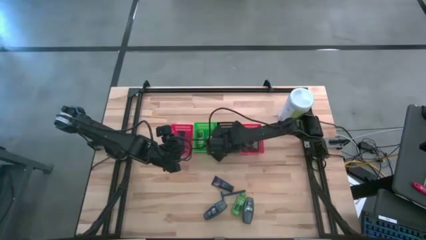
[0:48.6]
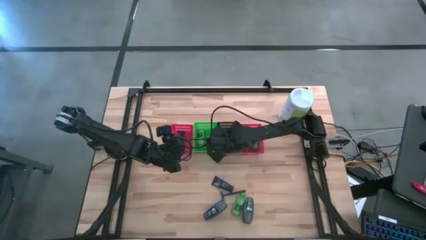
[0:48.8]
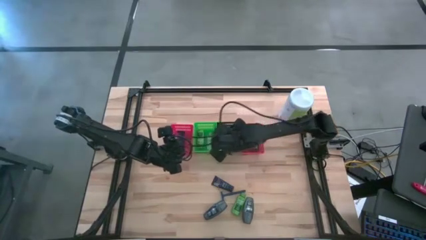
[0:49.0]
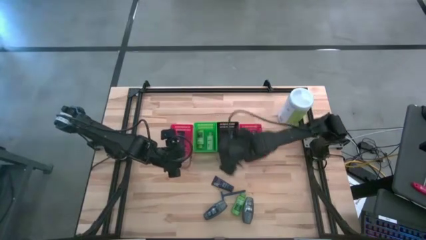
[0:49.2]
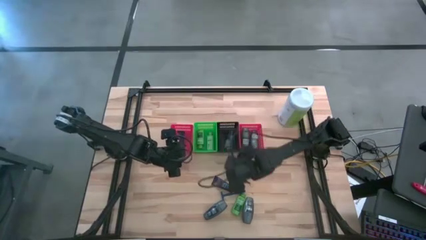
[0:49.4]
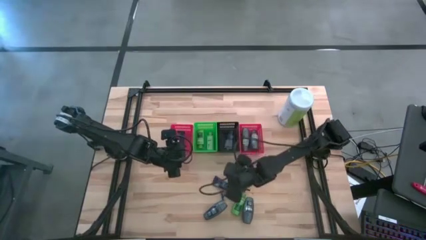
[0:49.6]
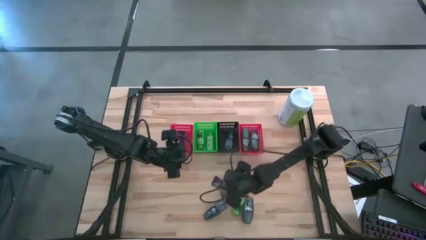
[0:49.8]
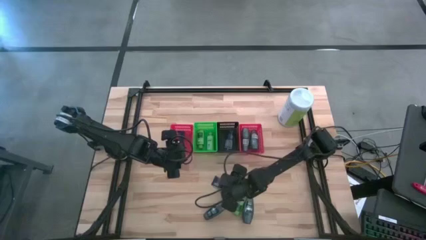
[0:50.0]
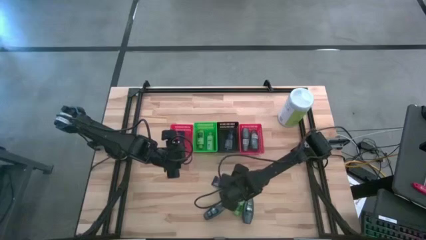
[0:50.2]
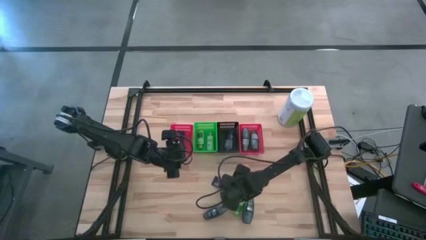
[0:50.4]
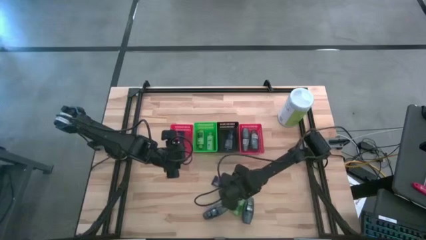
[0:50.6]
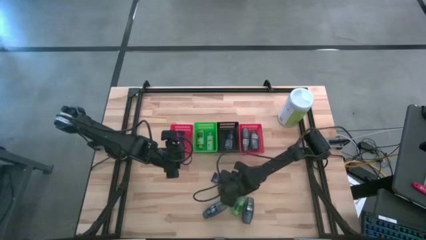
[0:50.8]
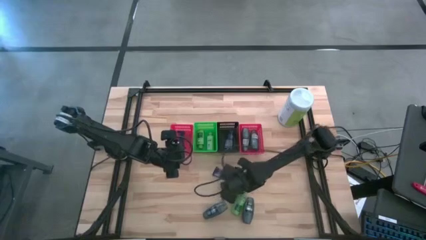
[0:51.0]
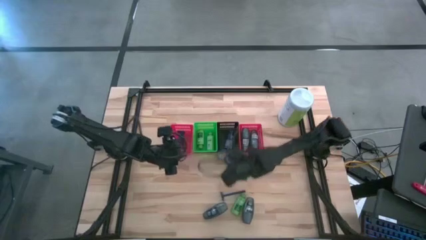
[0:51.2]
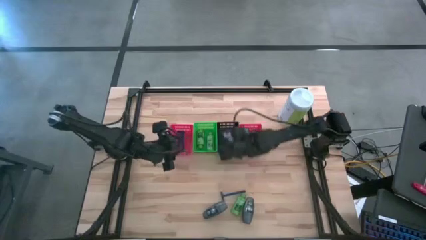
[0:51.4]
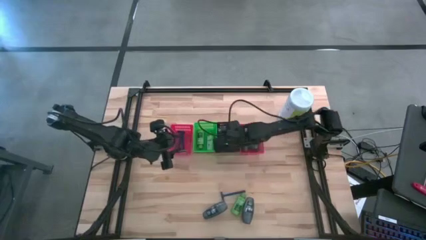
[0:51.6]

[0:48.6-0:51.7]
Task: Pick & Place Travel size toiletries
Put the blue shaving cream into the black bin

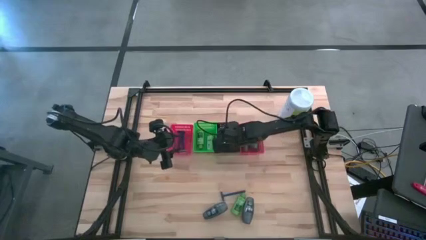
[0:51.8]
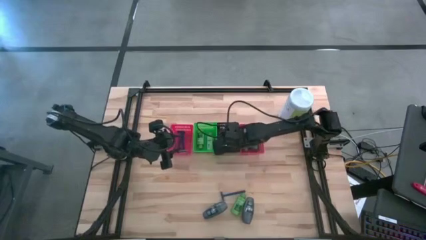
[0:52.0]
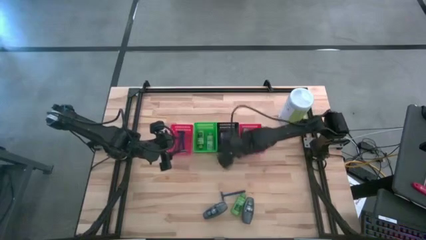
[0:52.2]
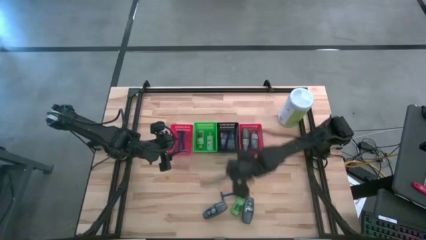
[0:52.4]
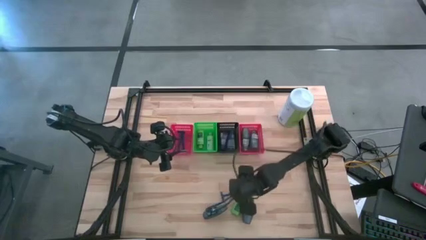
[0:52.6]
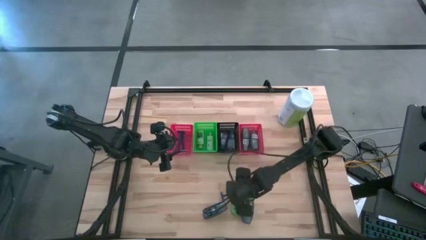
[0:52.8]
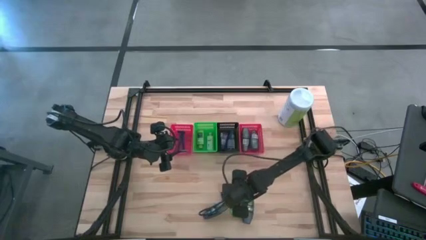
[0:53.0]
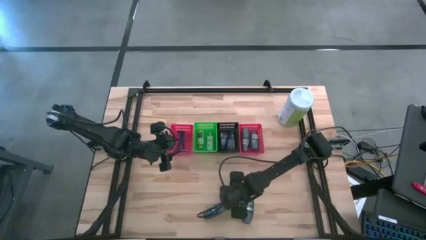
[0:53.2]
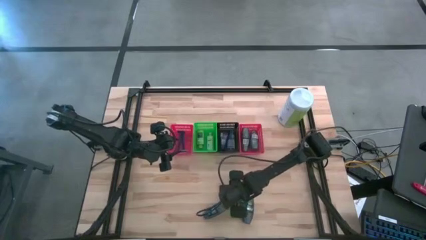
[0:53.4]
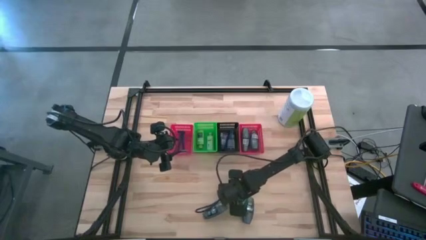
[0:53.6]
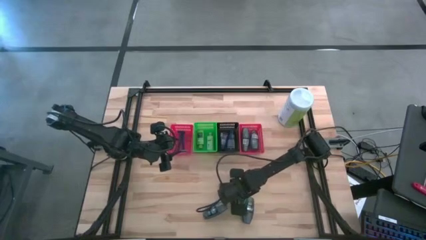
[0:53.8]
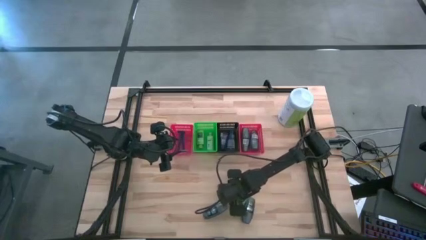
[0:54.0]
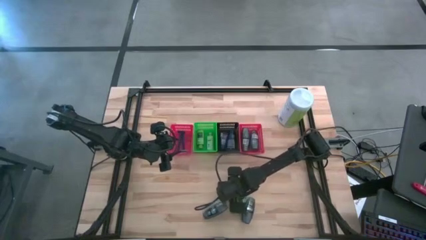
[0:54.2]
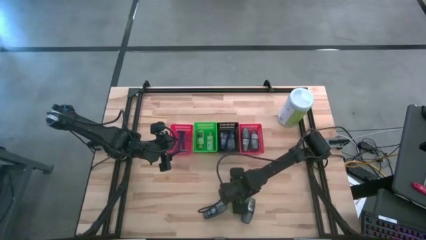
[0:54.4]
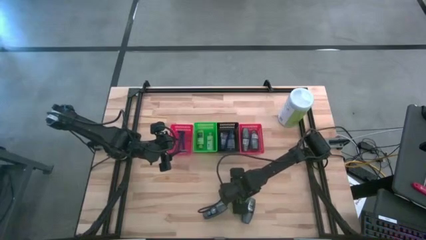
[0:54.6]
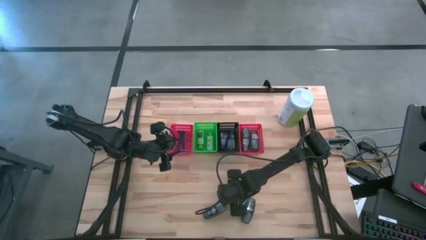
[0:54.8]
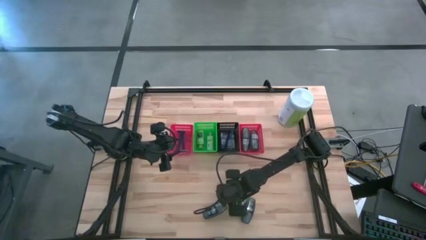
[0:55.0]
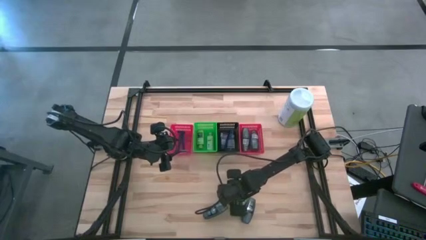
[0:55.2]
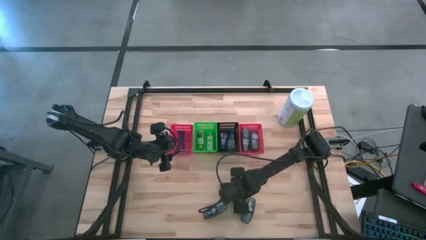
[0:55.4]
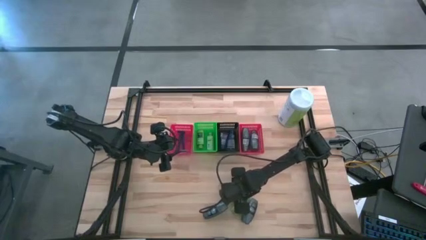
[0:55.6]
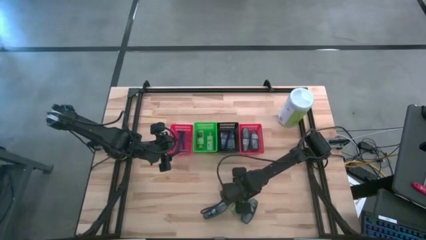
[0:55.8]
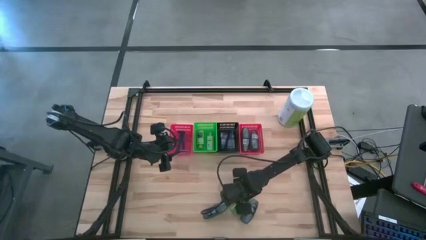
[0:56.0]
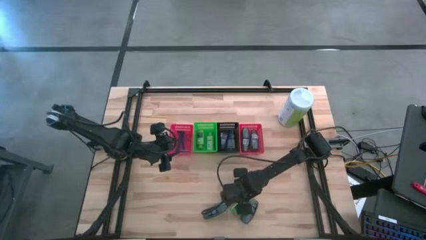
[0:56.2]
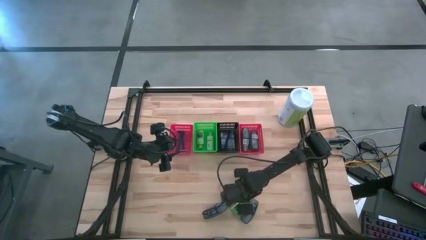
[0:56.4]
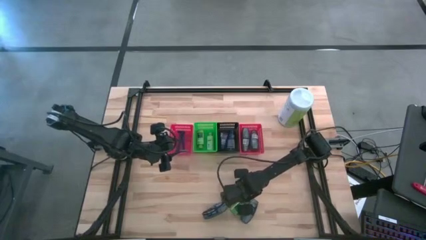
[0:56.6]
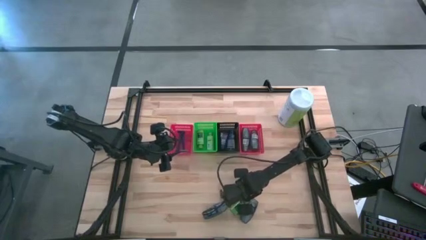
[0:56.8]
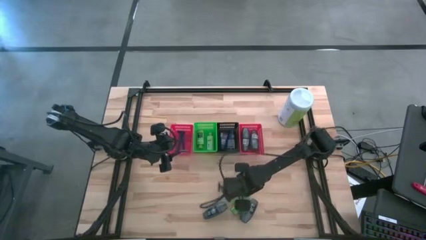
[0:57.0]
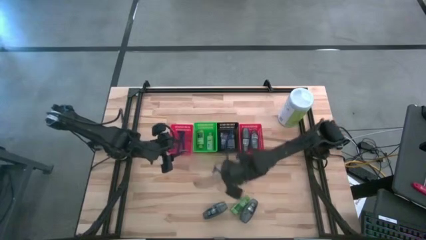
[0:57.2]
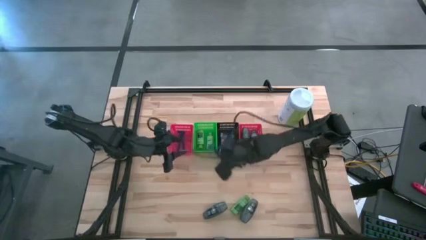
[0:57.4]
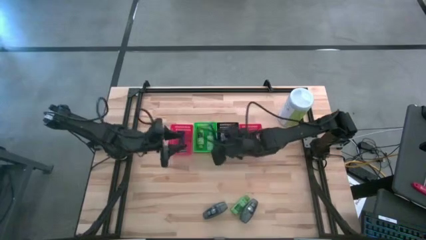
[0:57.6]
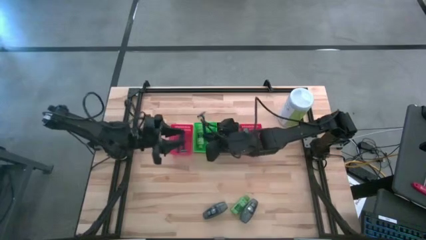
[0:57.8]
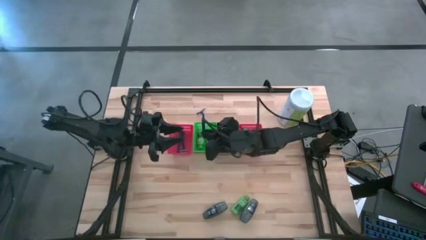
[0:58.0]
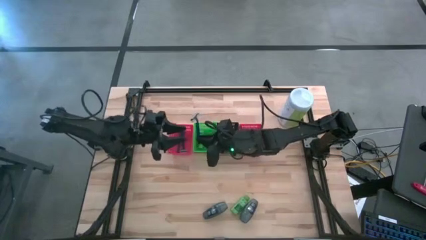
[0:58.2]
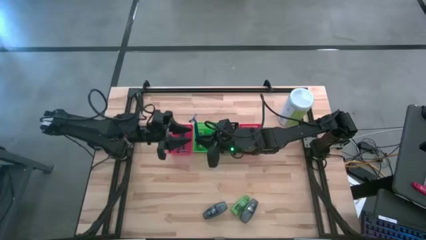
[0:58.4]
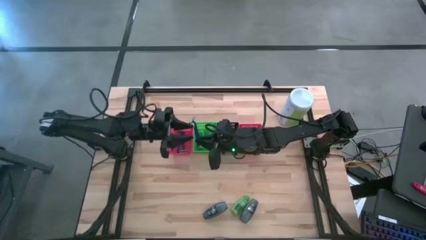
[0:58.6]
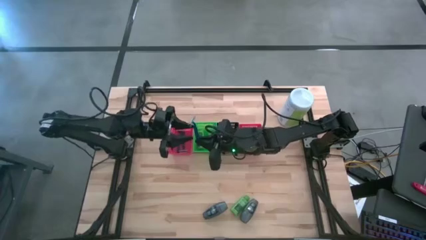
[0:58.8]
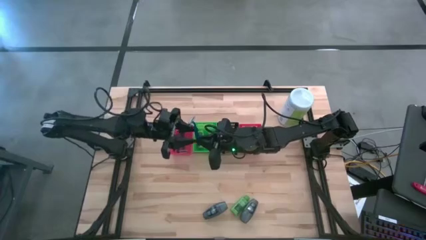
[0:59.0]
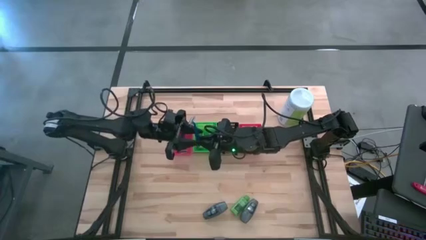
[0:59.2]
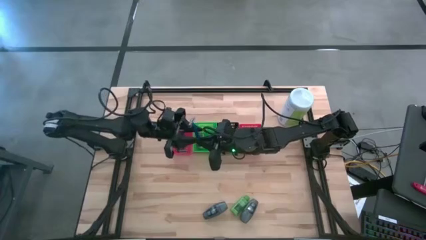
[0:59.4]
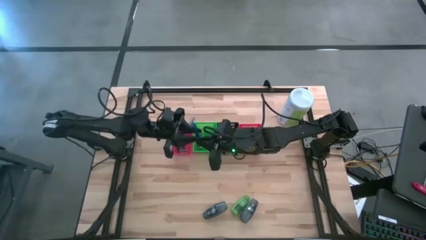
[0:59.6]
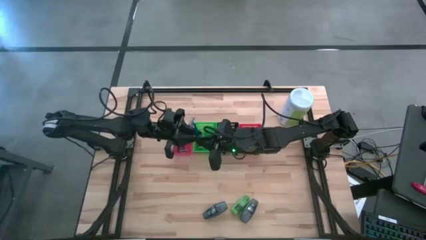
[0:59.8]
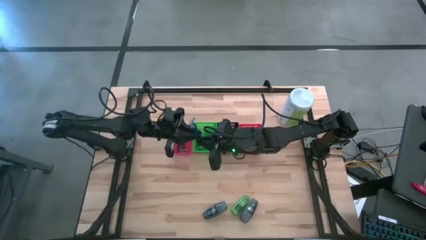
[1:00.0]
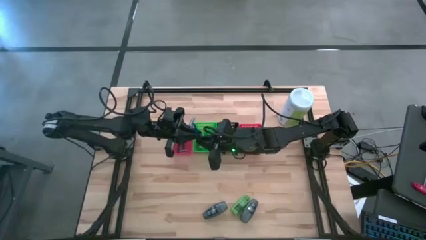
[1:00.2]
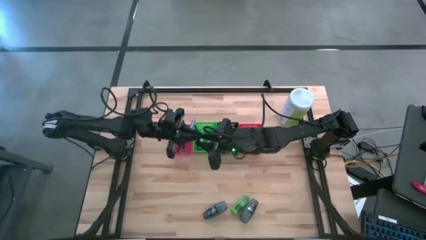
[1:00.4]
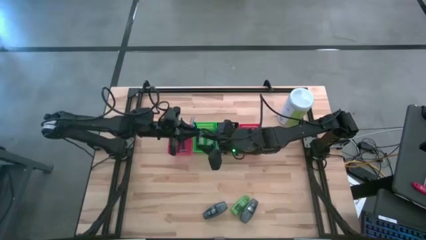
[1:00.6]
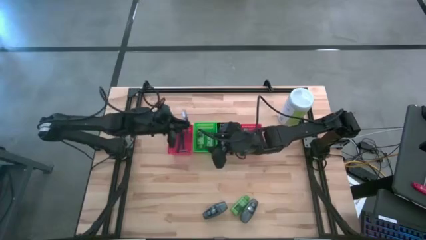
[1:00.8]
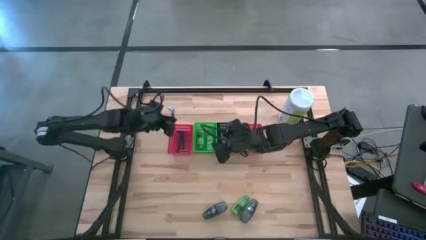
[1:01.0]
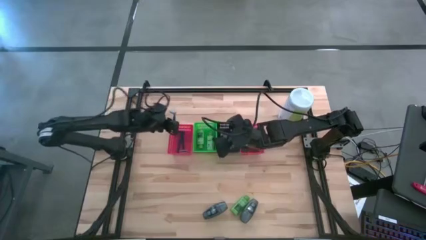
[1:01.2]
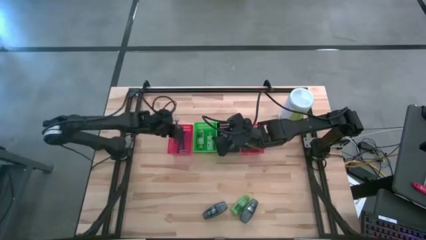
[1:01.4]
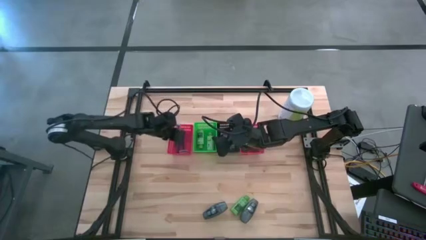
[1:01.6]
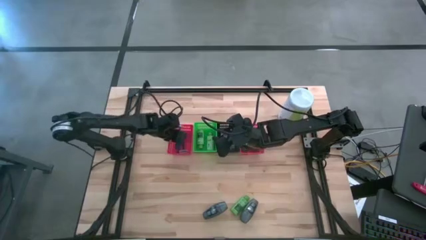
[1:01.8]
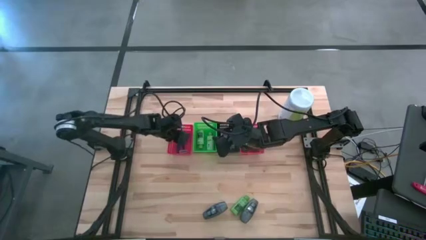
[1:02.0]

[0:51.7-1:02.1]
Put the blue razor into the left red bin

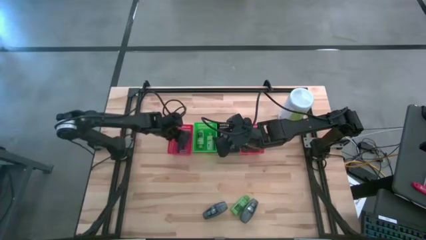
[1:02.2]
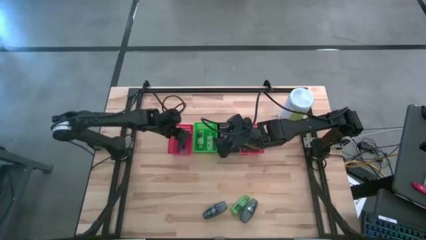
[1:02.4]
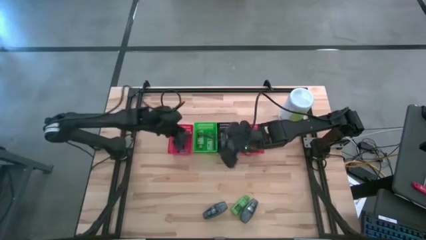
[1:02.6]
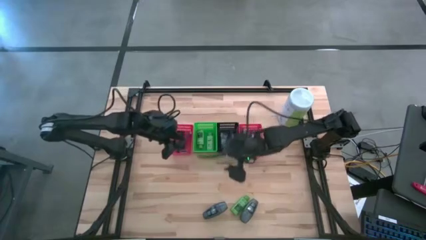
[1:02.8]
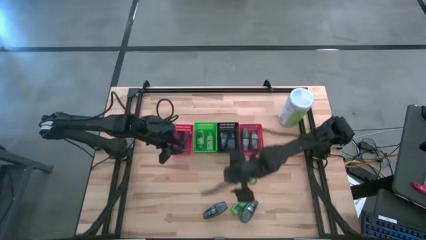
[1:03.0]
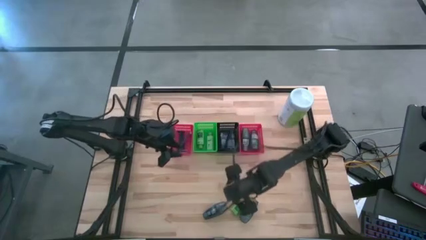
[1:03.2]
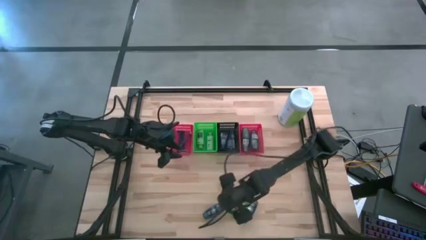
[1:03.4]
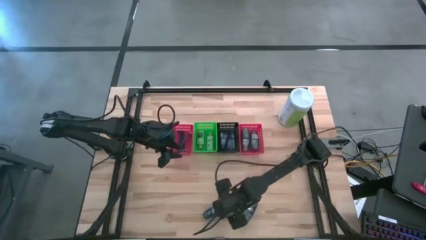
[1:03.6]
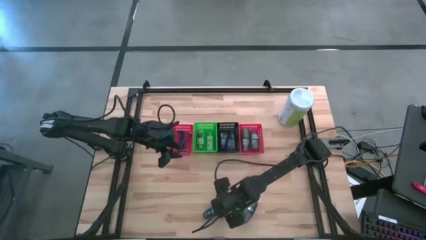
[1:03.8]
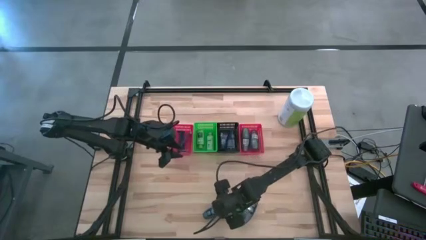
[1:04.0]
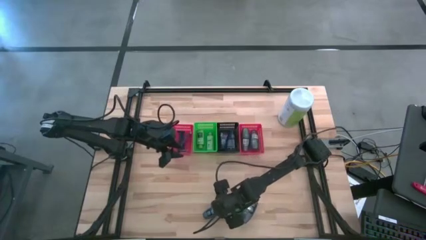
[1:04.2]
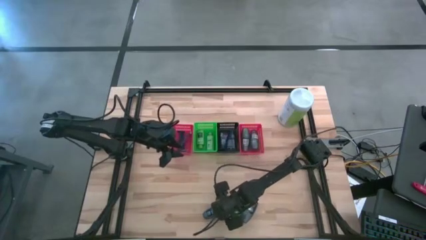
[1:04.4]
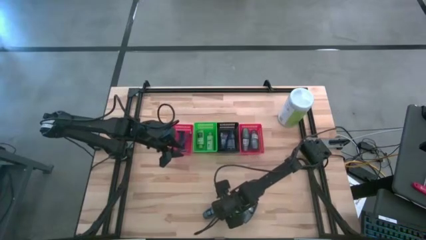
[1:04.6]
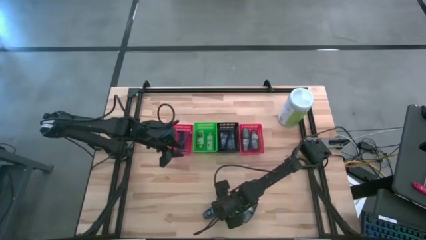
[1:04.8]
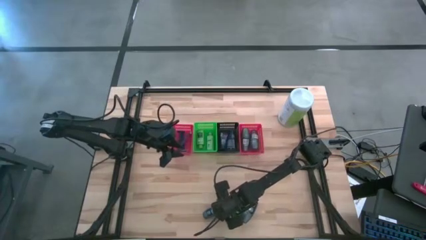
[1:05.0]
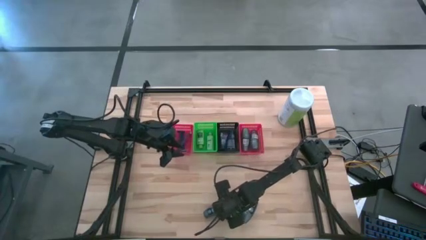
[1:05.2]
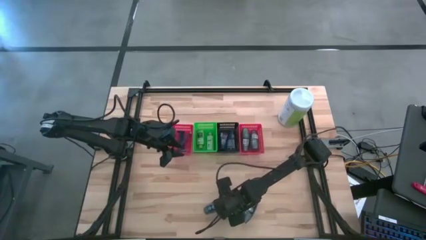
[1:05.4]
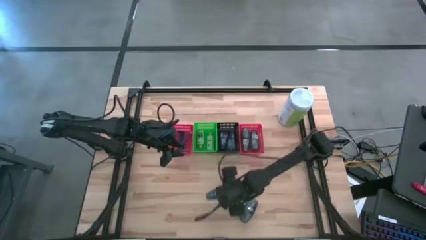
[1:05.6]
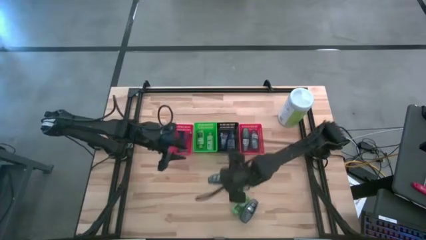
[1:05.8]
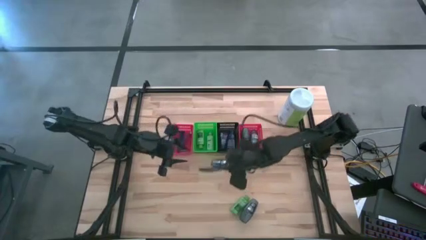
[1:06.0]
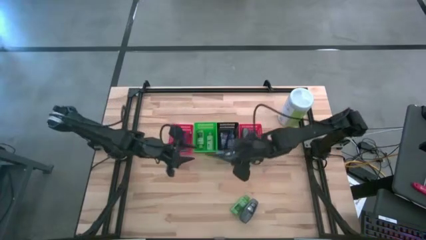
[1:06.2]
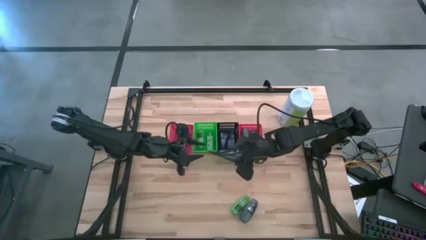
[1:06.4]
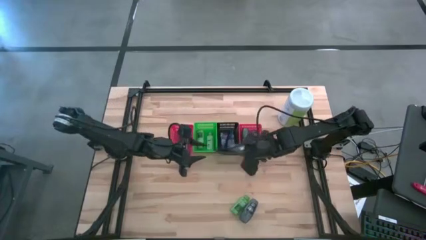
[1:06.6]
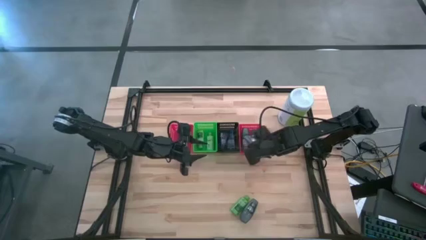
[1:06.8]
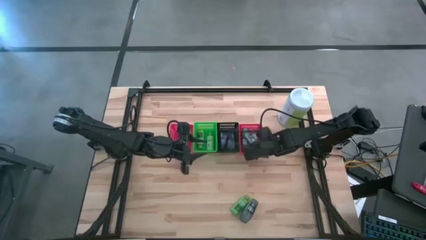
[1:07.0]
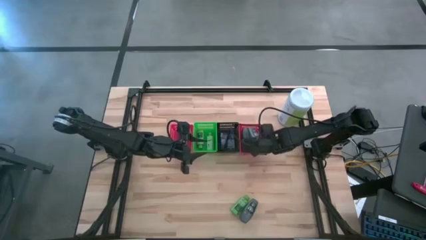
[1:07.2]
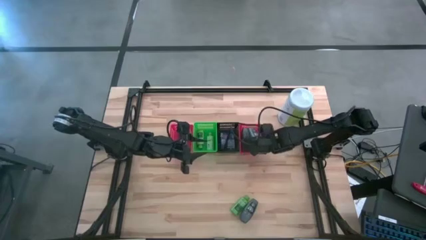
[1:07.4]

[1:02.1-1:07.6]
Put the black deodorant into the right red bin
